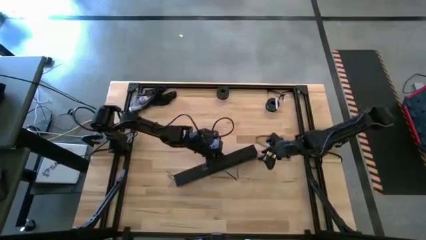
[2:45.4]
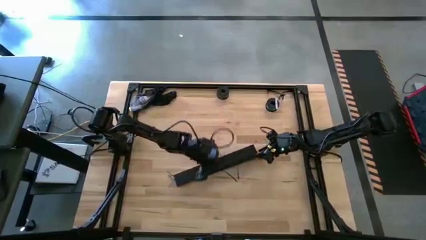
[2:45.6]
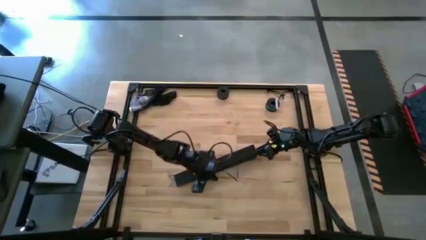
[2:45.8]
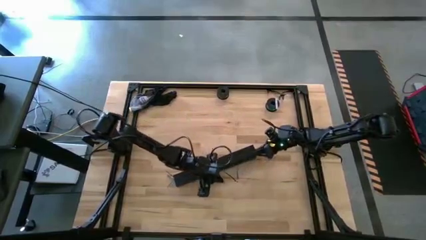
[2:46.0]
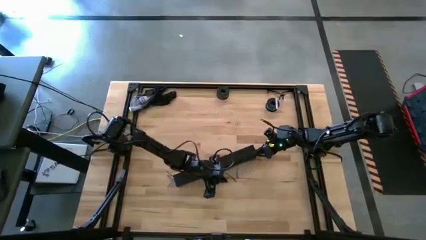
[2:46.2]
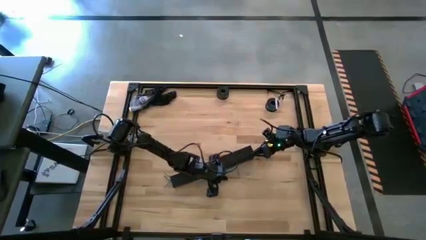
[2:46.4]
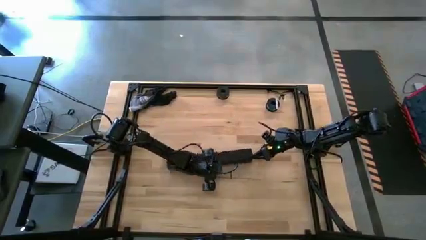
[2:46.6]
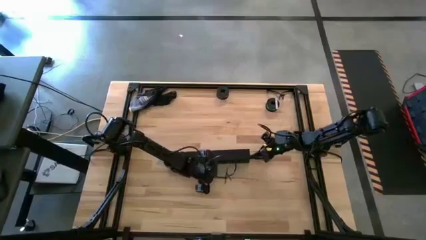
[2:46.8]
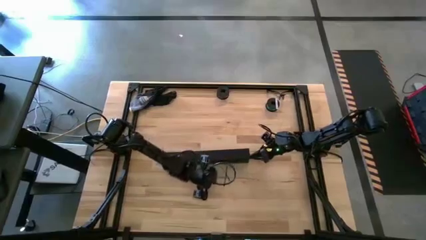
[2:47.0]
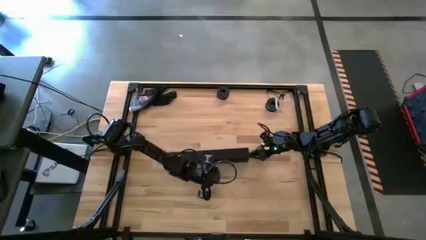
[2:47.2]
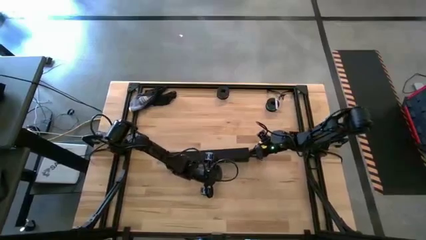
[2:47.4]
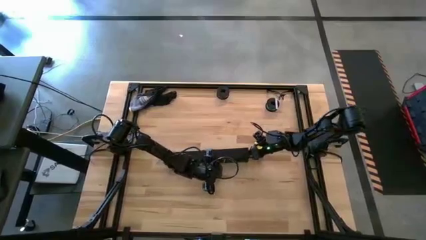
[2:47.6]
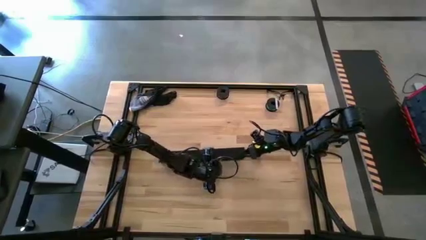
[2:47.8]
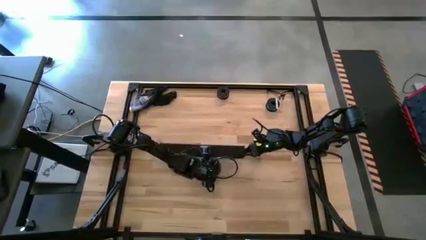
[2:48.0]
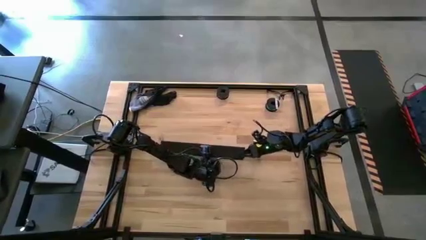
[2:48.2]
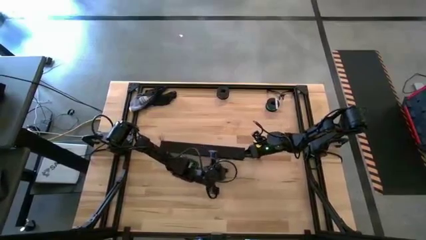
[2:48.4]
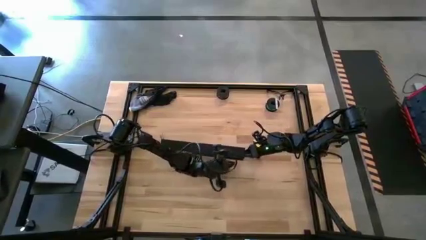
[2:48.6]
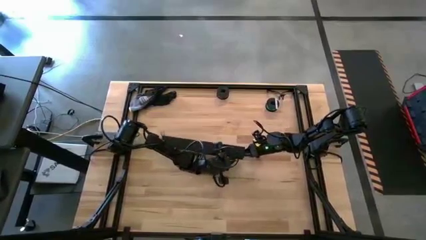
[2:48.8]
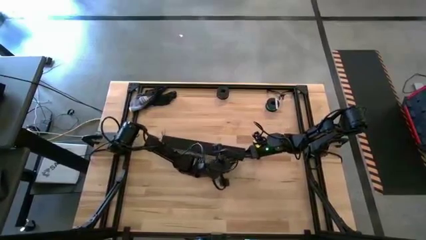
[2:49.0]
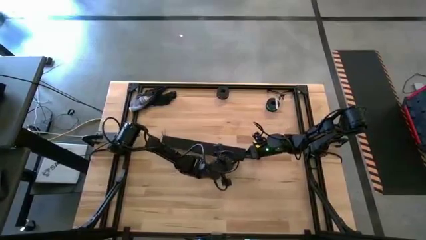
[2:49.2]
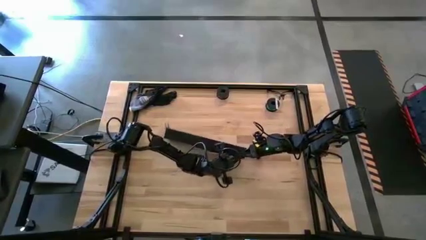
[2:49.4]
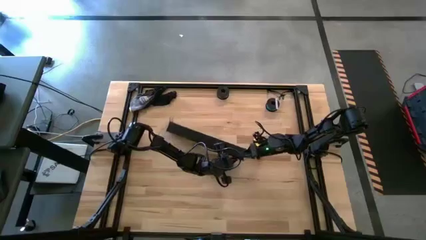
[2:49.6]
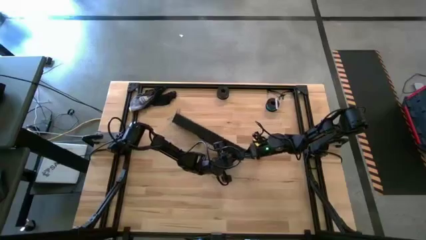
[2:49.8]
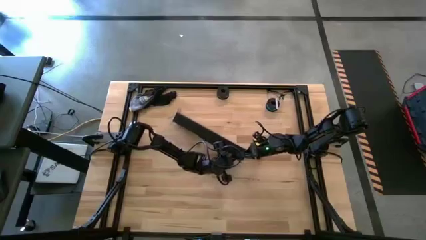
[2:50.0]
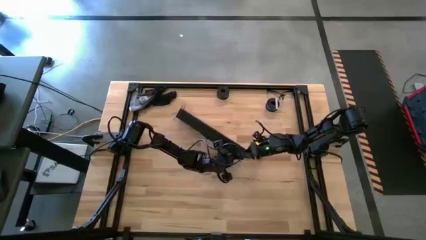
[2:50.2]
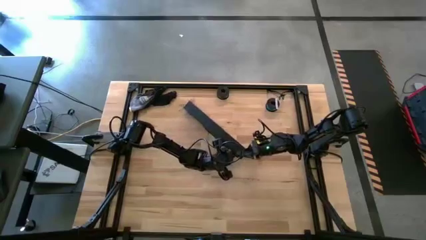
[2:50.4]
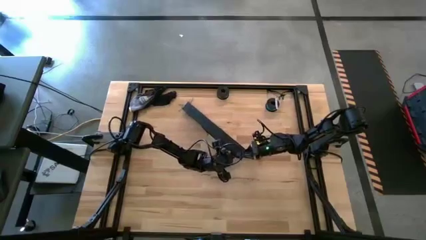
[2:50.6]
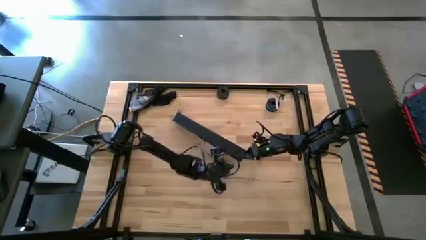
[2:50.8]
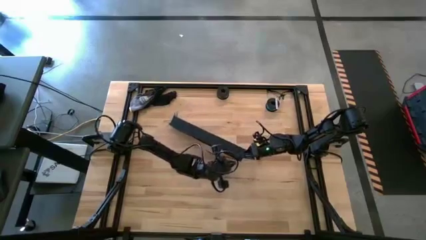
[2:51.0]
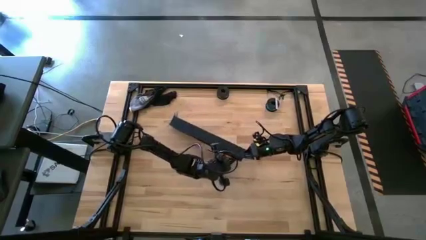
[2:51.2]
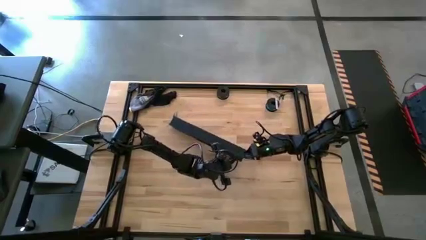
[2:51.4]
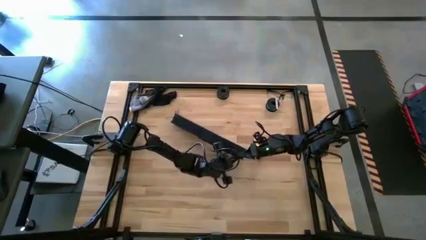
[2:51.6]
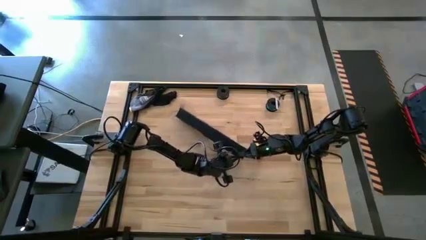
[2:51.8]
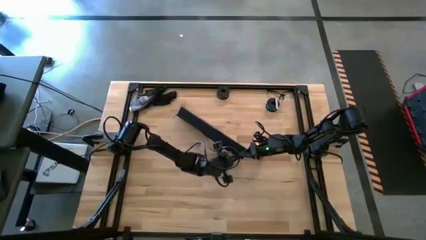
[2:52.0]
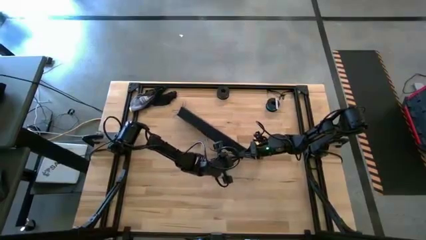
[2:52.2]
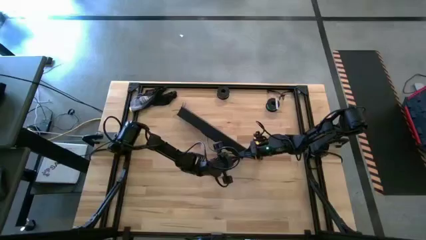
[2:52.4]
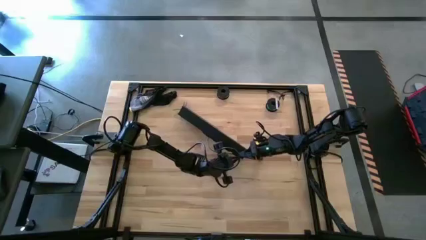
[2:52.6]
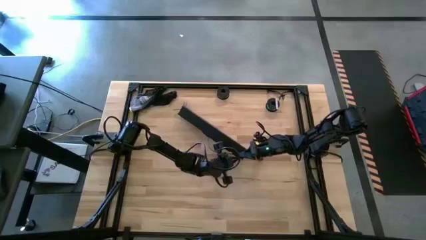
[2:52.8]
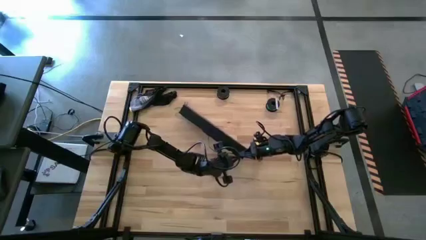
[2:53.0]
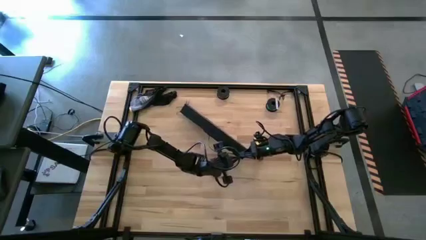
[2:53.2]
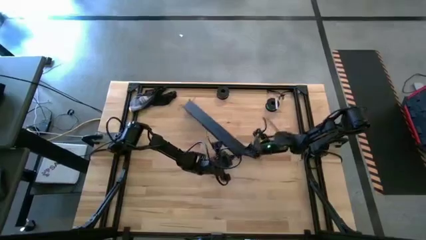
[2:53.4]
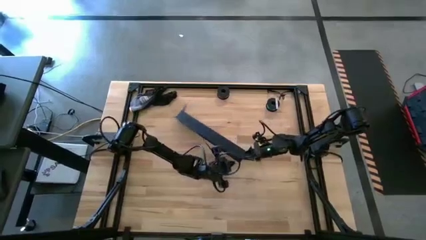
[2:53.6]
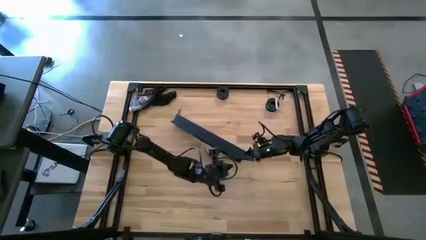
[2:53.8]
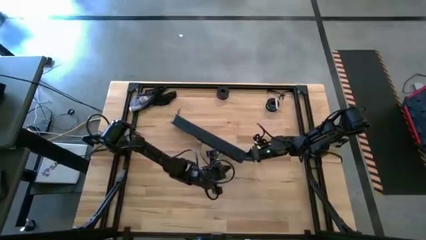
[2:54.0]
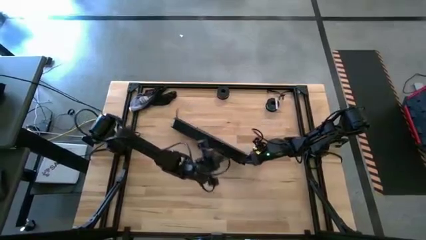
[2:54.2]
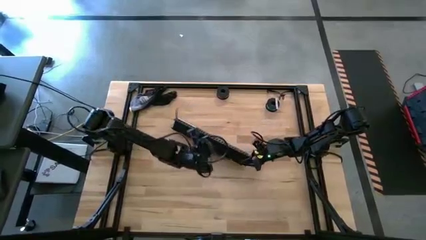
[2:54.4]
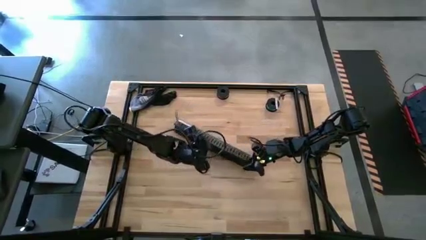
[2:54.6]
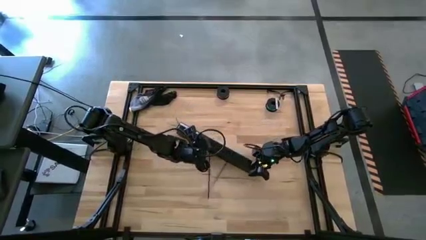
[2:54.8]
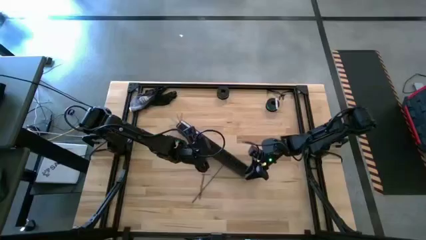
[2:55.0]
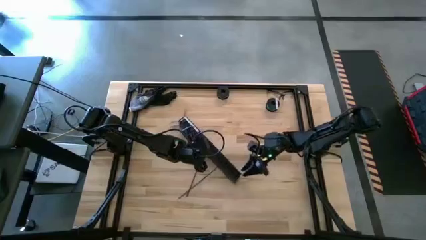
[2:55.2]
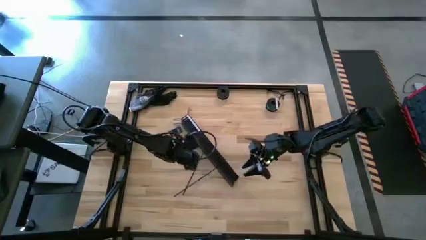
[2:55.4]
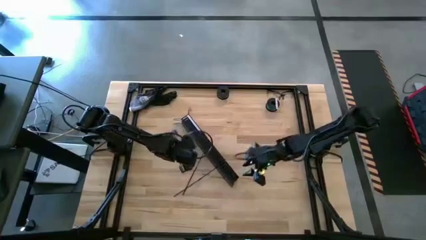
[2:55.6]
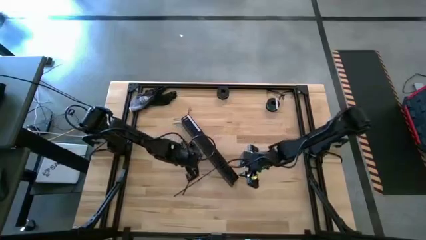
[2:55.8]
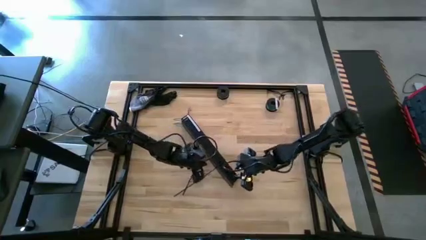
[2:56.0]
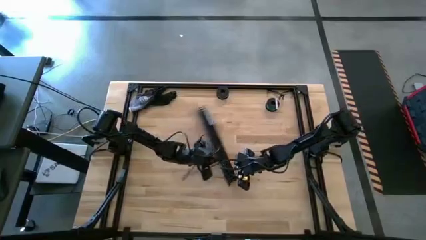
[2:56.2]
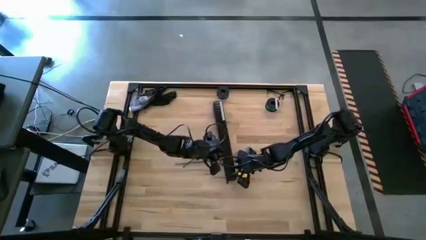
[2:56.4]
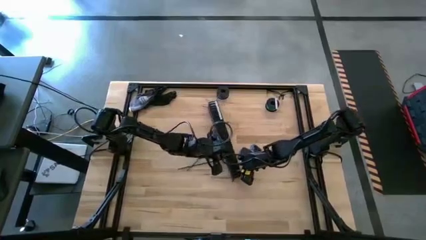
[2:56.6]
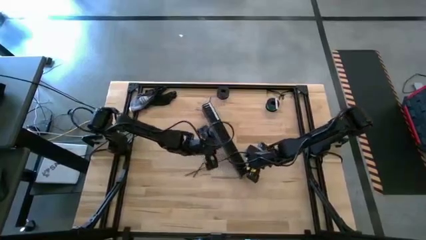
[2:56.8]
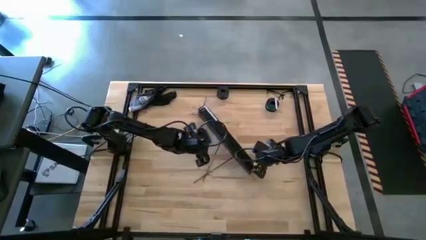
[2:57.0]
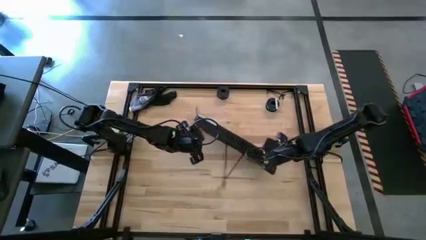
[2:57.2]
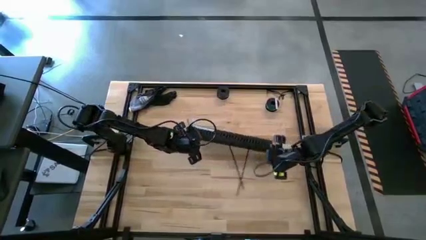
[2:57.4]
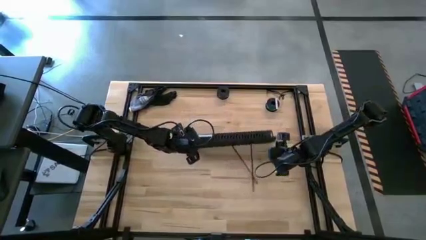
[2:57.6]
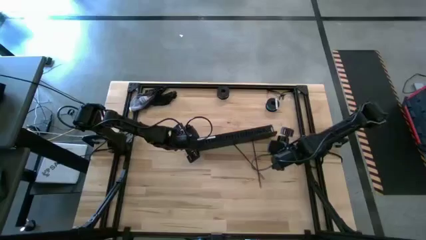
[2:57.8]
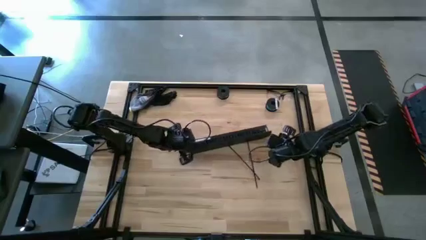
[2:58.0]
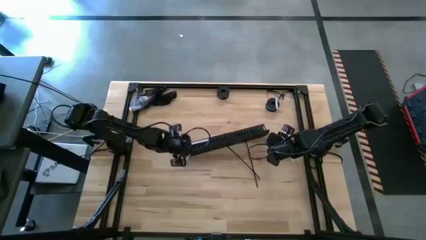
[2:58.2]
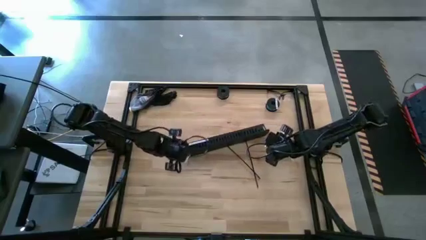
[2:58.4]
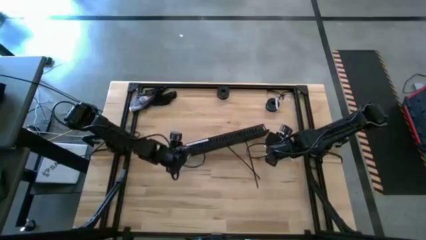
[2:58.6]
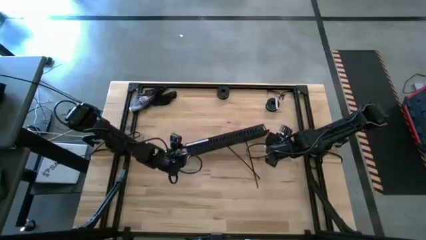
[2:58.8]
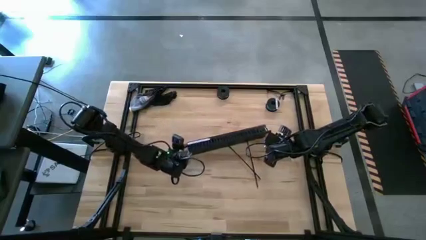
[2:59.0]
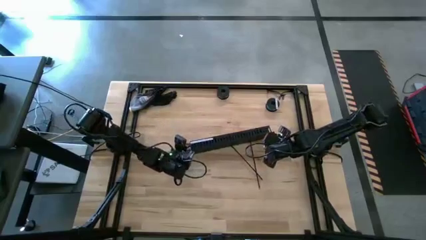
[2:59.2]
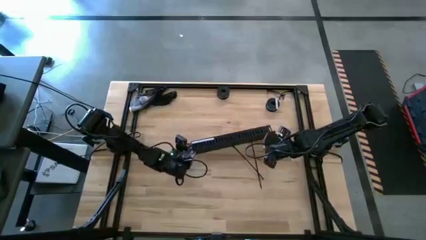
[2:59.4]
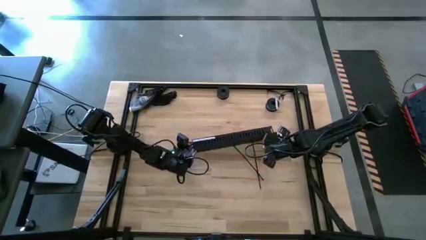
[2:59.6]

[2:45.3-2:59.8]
Task: Ziptie cables
Close the black cable duct
